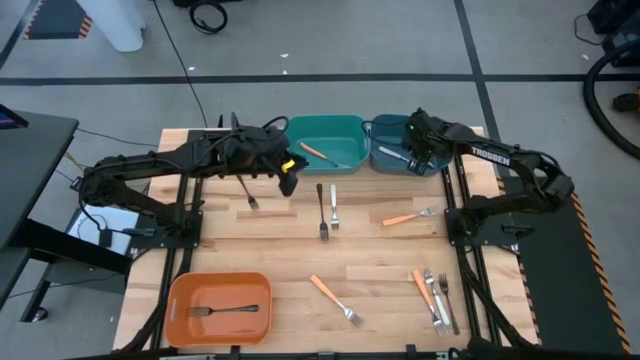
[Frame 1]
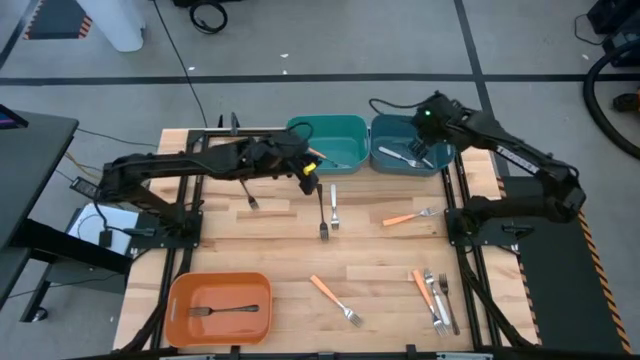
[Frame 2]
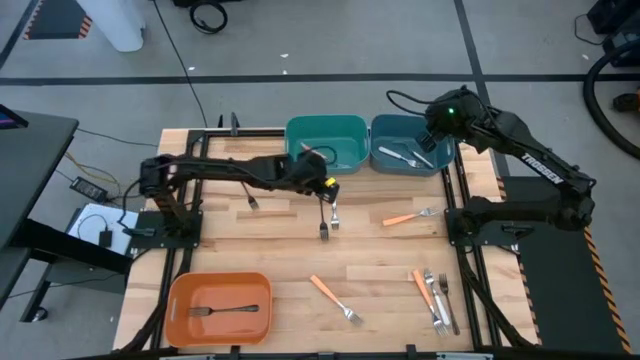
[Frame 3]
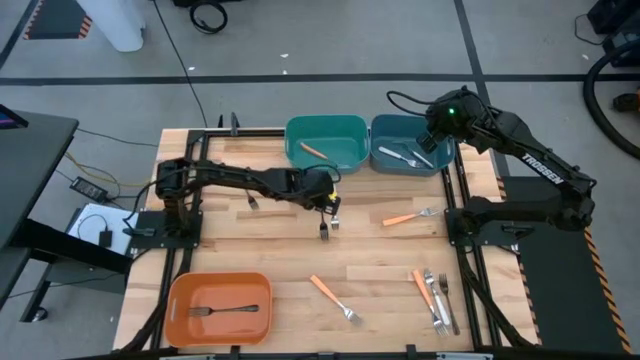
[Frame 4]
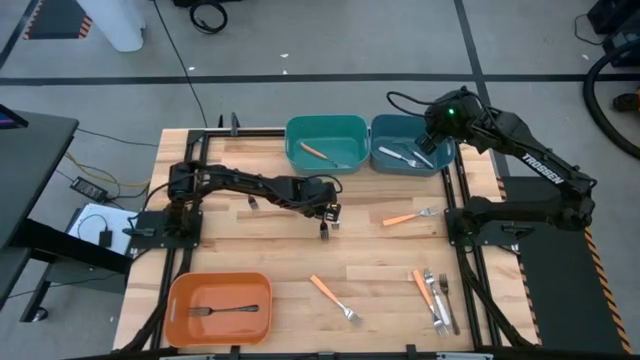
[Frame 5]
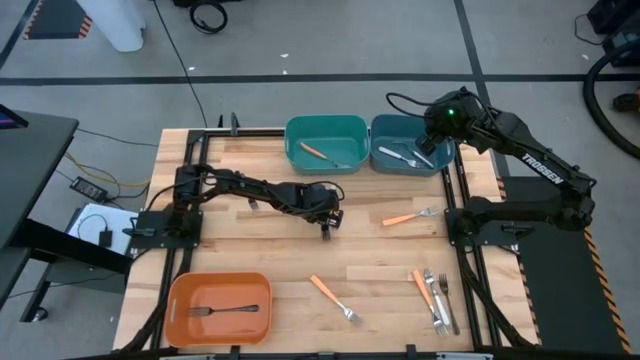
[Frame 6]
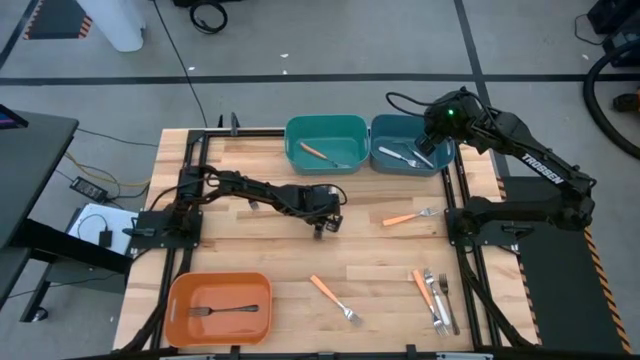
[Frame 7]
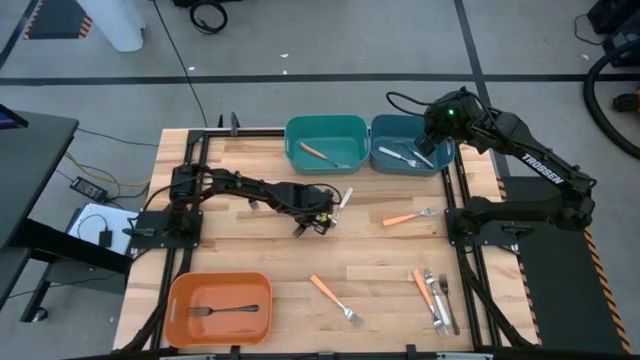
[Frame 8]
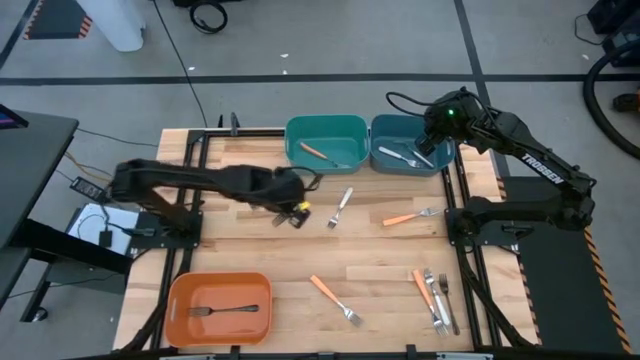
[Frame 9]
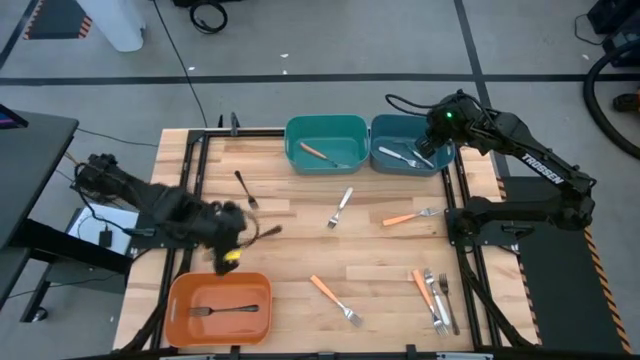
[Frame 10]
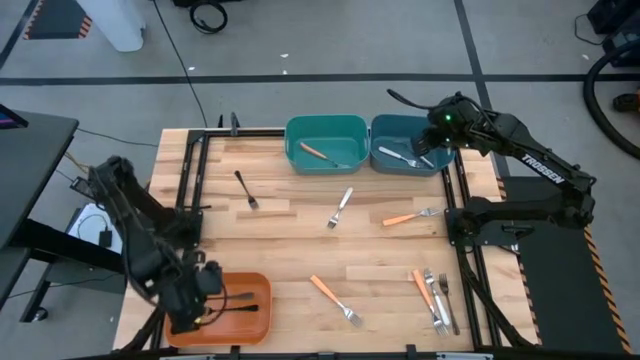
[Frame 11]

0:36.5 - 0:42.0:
Task: Sort silverware by color (type)
Put the black fork into the orange bin

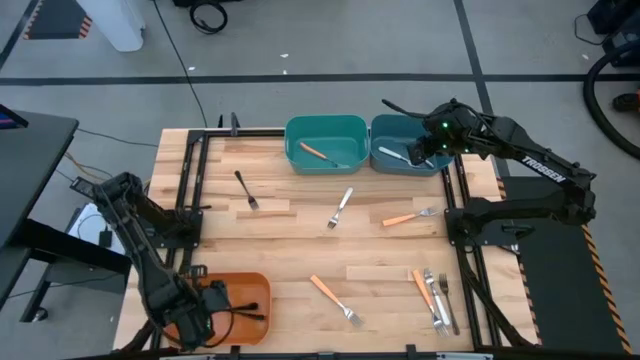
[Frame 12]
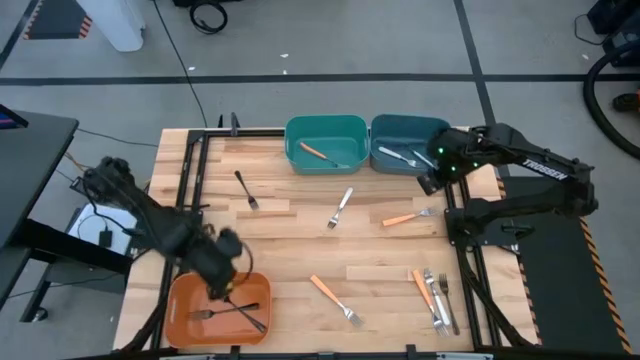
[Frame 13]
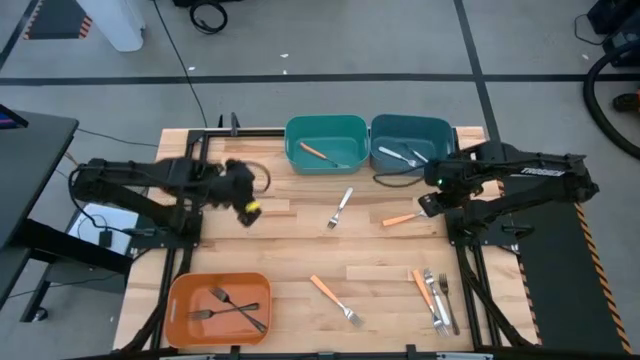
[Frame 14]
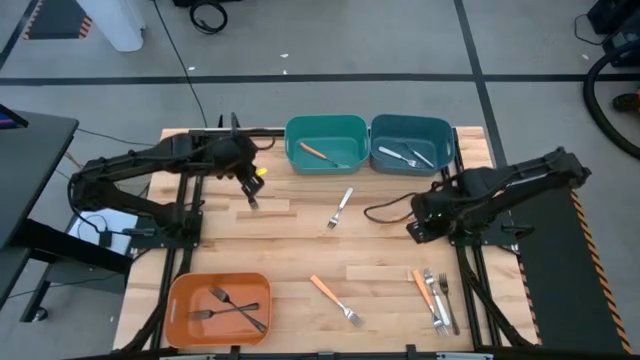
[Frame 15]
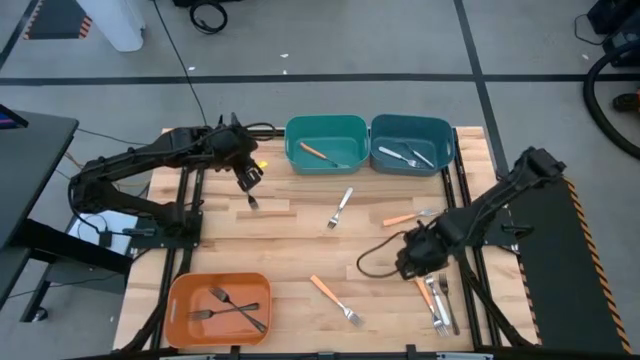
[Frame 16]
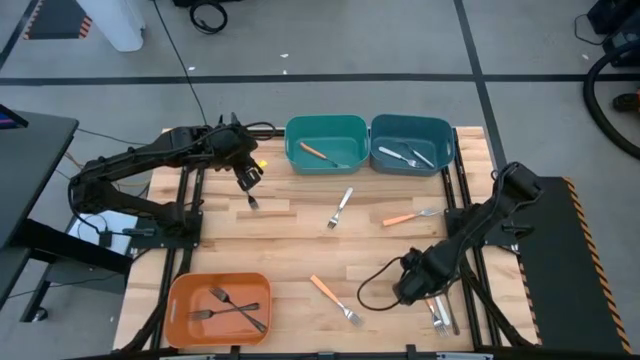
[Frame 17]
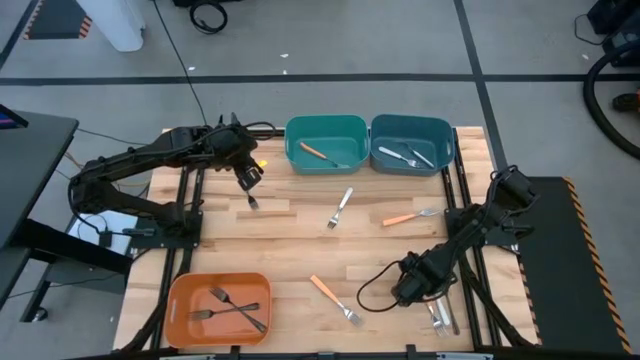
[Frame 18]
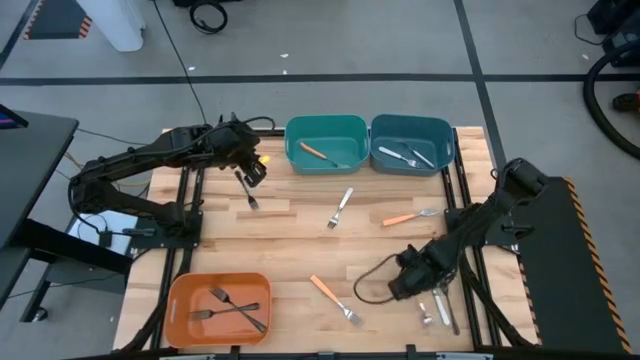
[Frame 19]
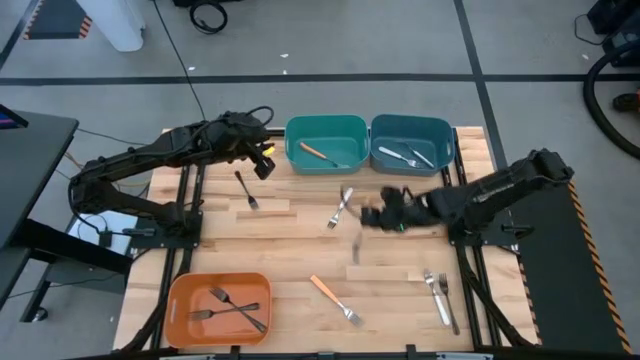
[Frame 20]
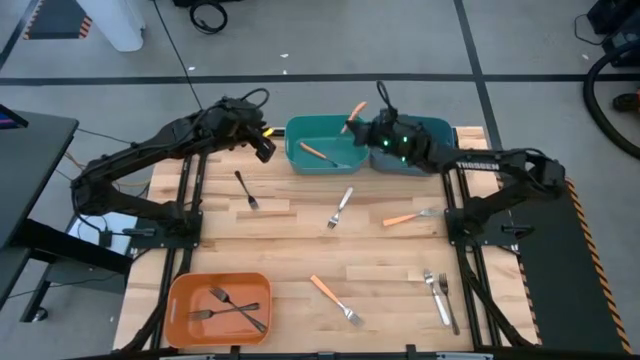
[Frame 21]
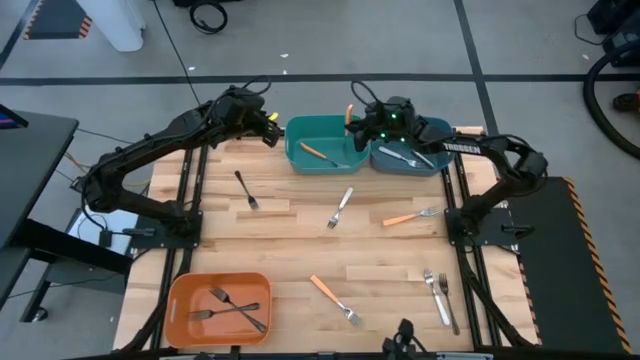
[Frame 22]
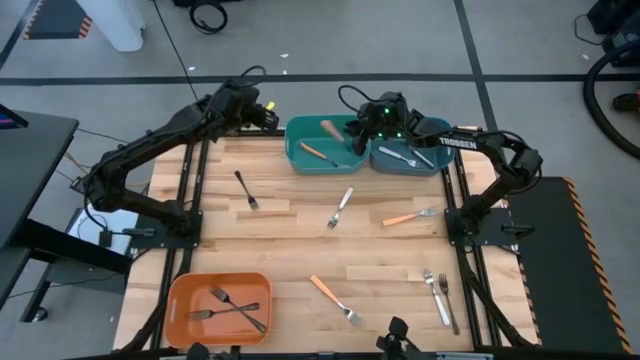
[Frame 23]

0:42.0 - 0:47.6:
Put the orange fork into the green bin

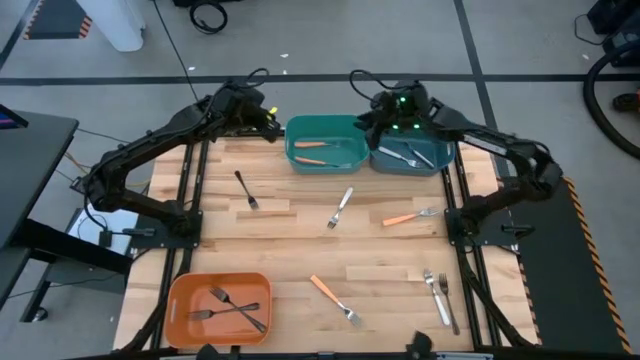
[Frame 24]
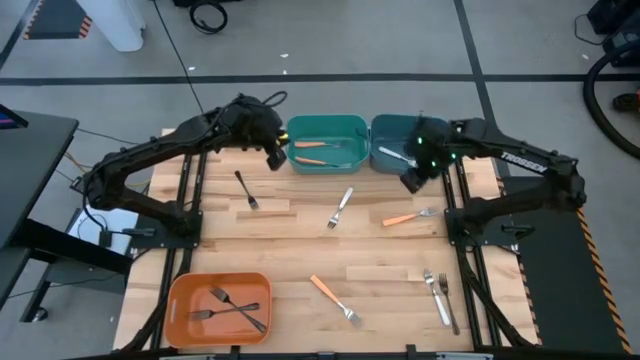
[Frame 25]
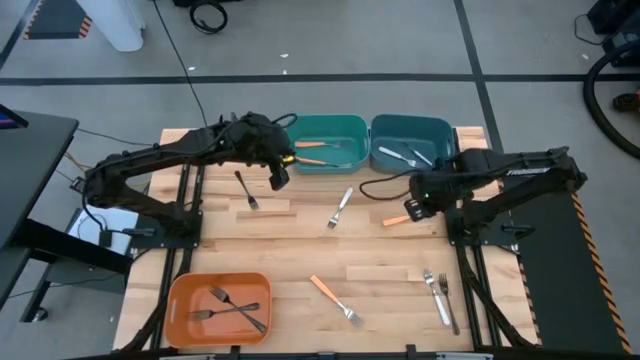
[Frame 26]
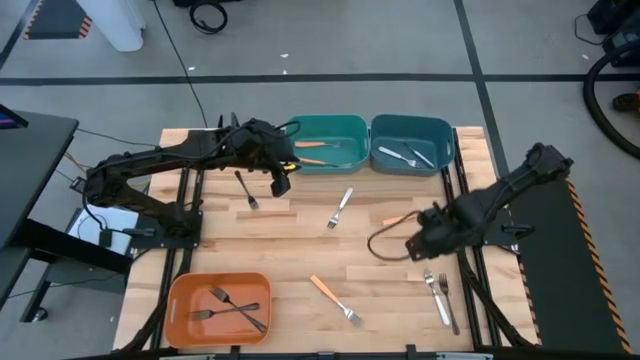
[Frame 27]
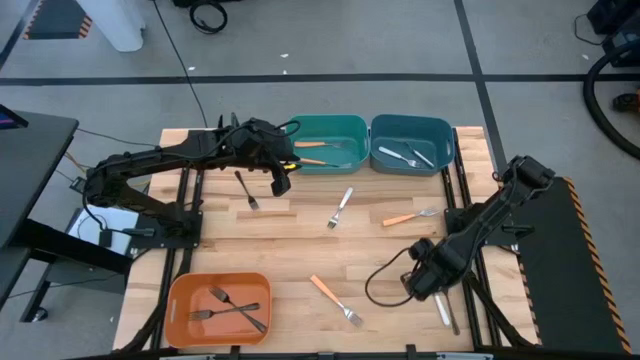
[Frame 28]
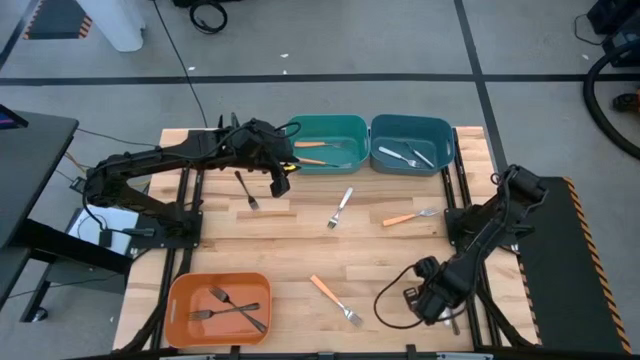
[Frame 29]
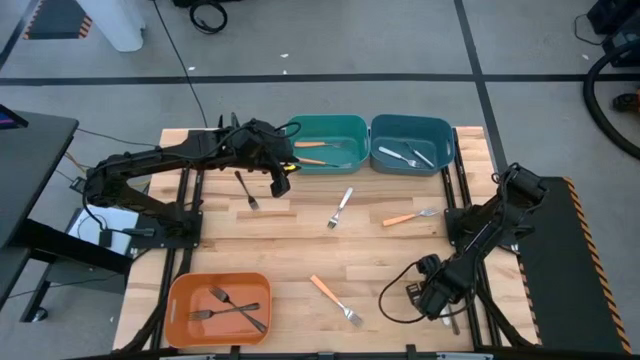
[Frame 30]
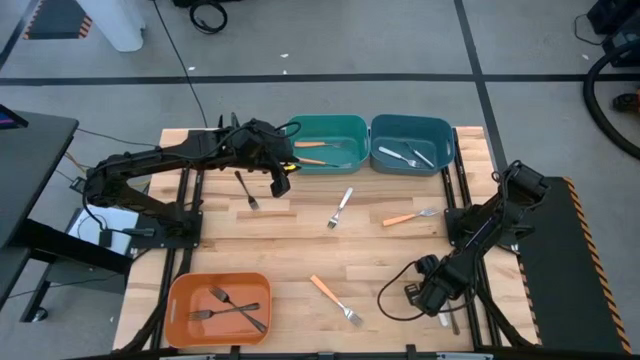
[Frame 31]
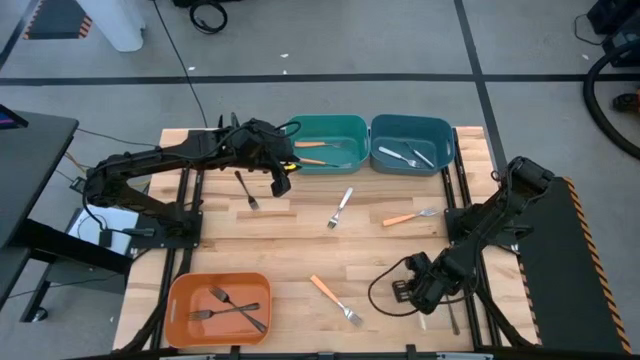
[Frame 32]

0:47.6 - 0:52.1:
Put the white fork into the blue bin

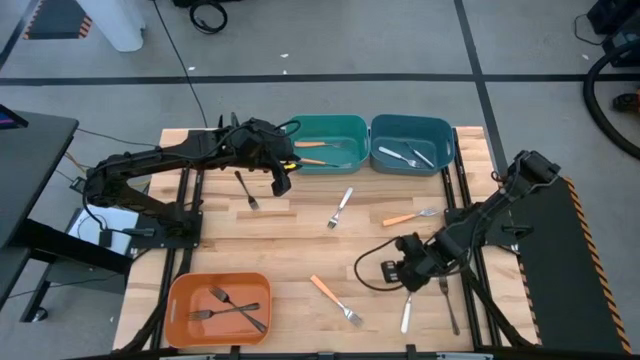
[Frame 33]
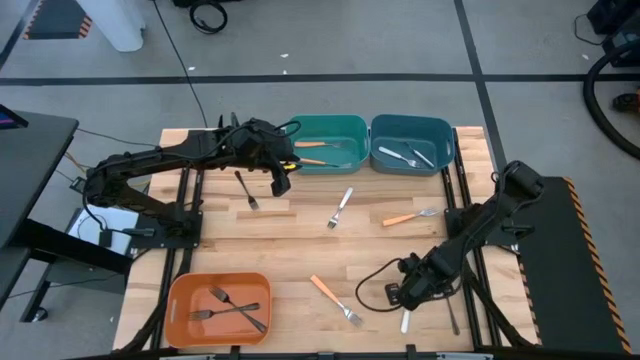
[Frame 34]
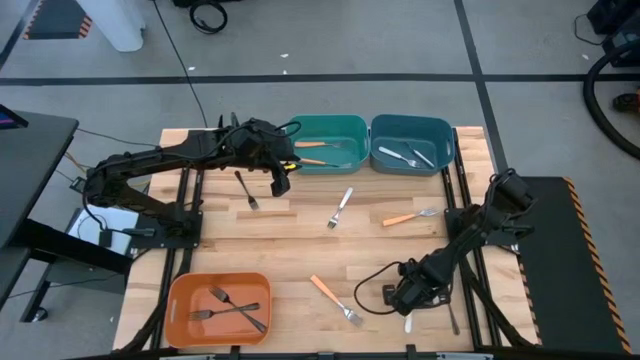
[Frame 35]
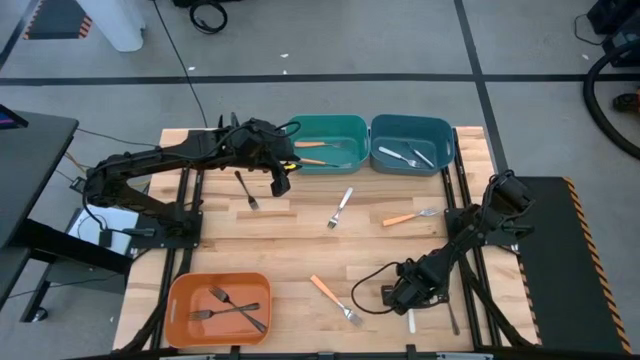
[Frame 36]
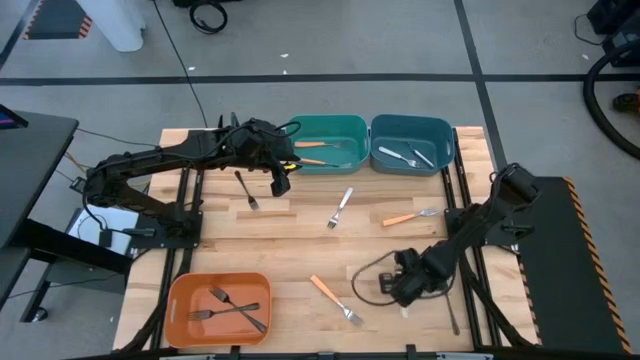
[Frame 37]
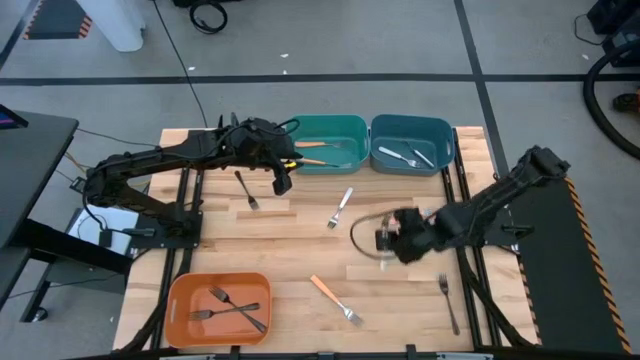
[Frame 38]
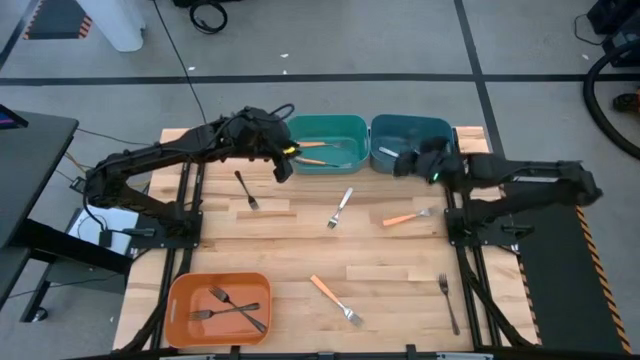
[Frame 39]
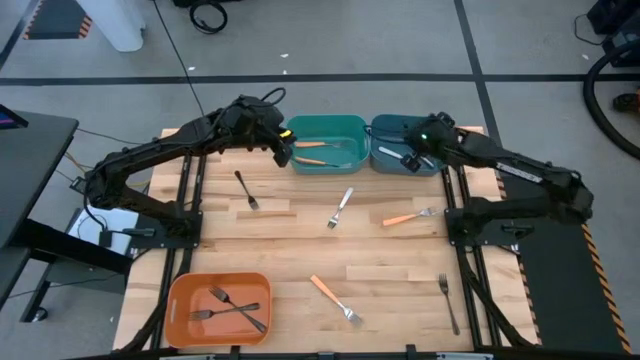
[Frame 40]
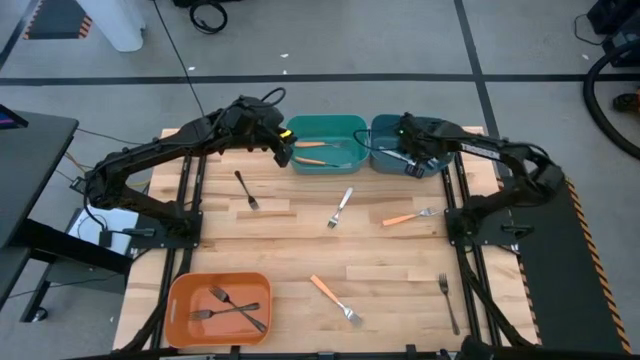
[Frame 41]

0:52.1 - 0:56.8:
Put the white fork into the blue bin

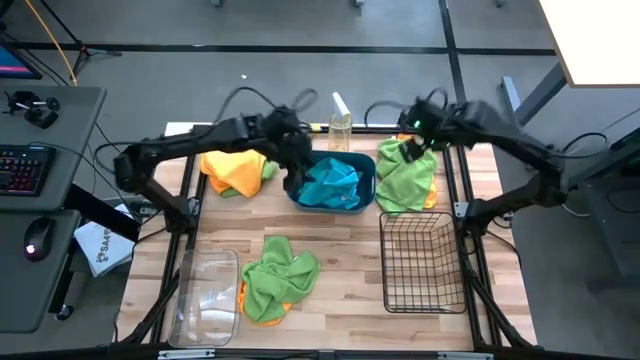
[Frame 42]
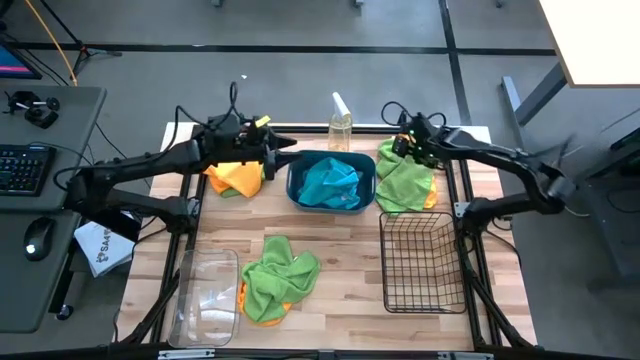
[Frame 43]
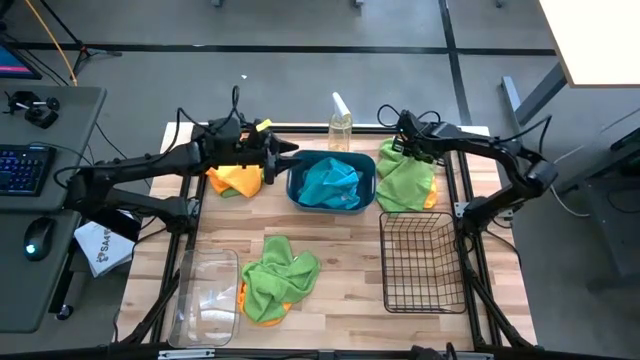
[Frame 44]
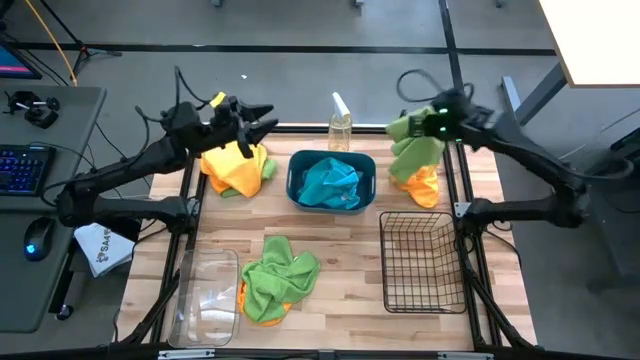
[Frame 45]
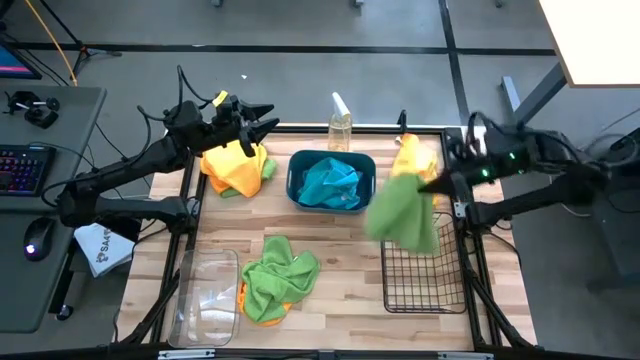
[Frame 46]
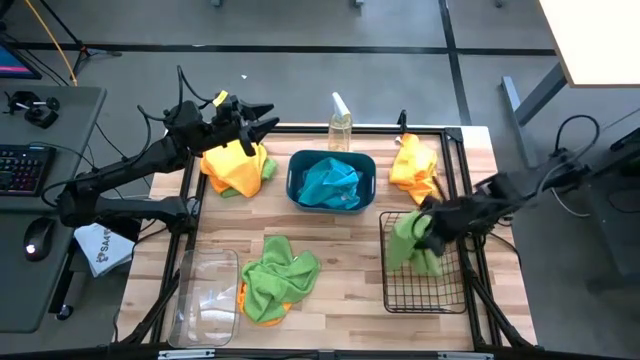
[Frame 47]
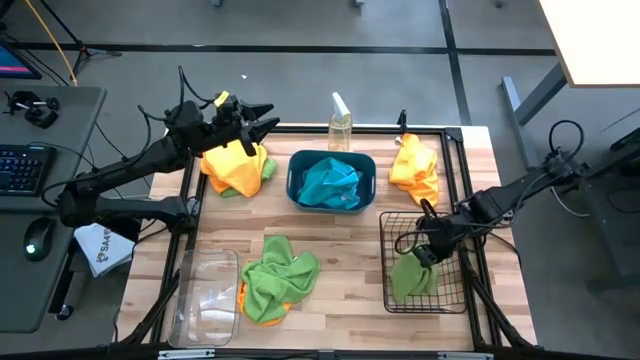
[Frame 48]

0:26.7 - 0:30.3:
Task: Sort microfiber towel by color & place in baskets
Put the top right green towel into the black wire basket
